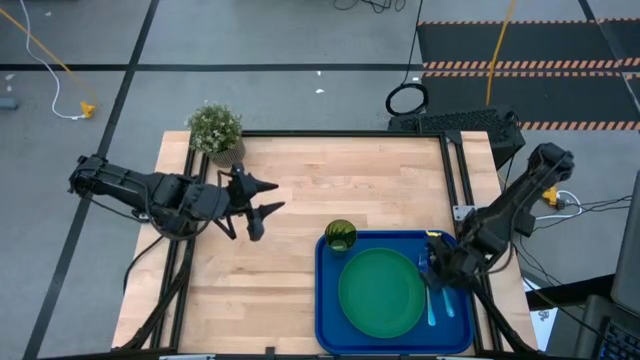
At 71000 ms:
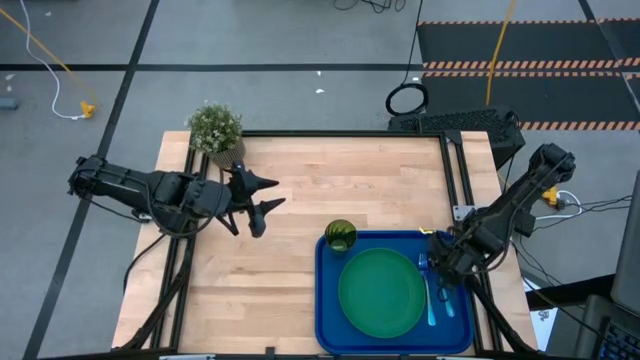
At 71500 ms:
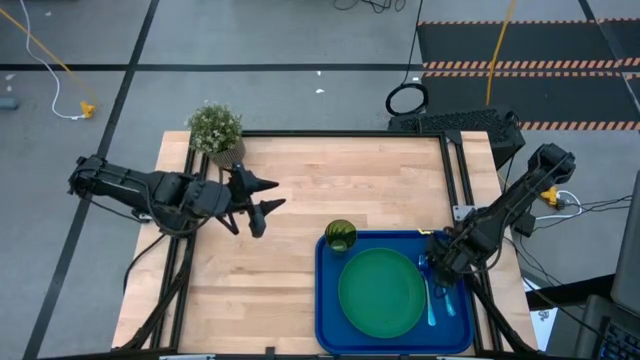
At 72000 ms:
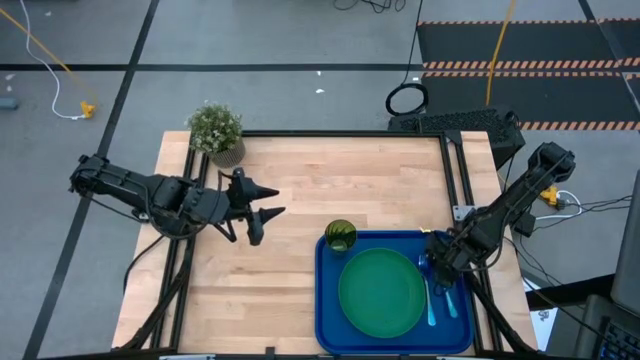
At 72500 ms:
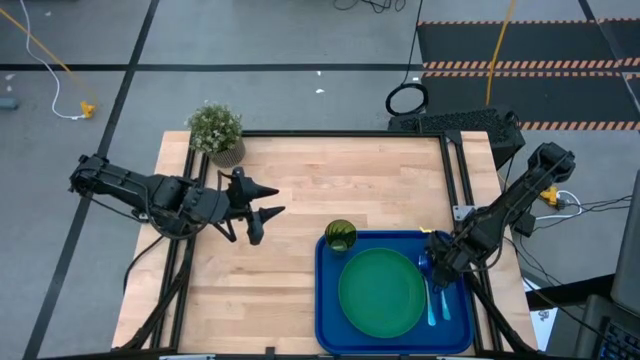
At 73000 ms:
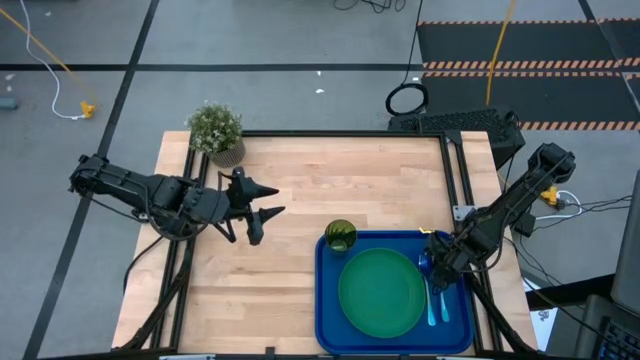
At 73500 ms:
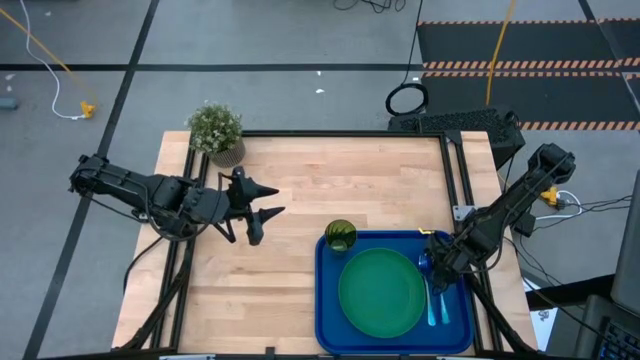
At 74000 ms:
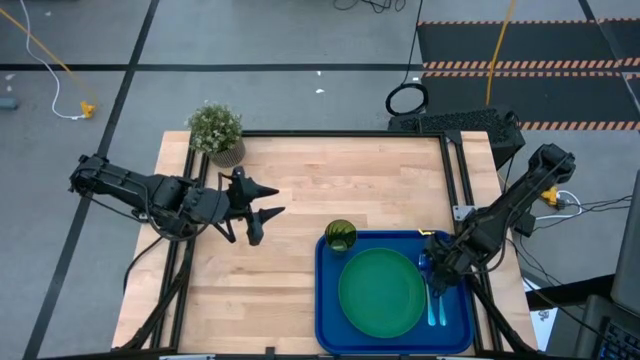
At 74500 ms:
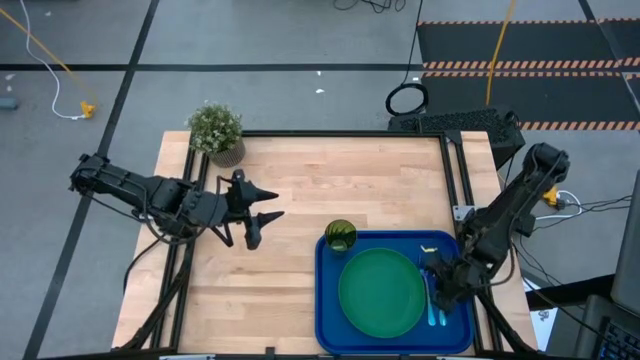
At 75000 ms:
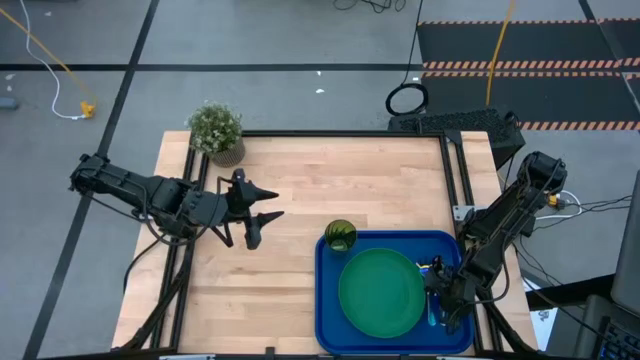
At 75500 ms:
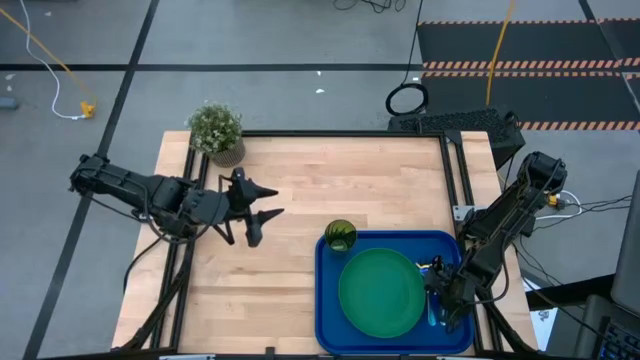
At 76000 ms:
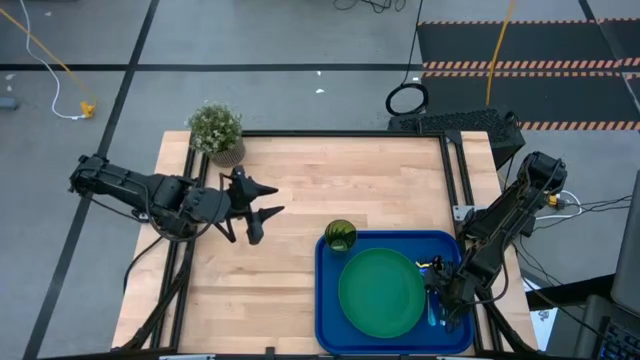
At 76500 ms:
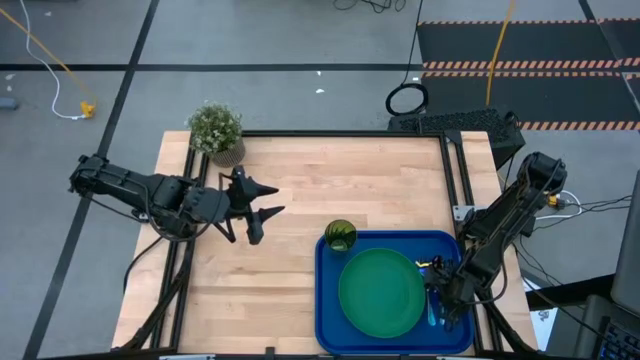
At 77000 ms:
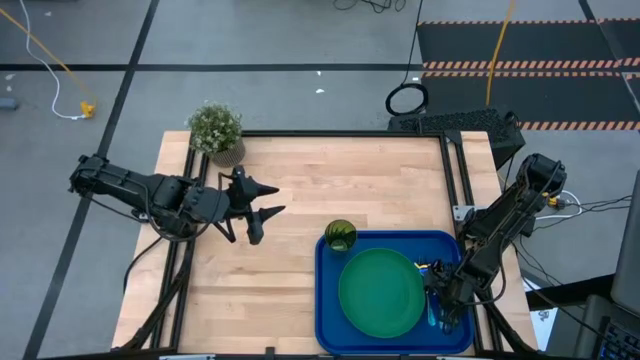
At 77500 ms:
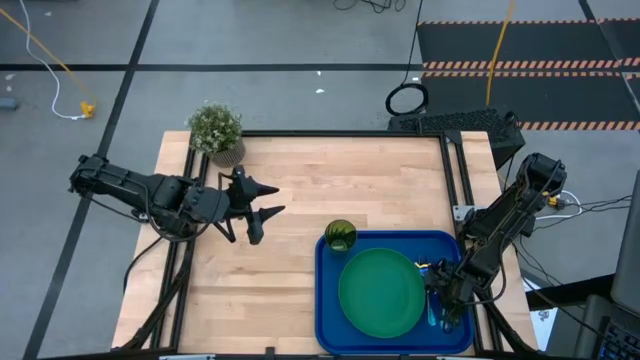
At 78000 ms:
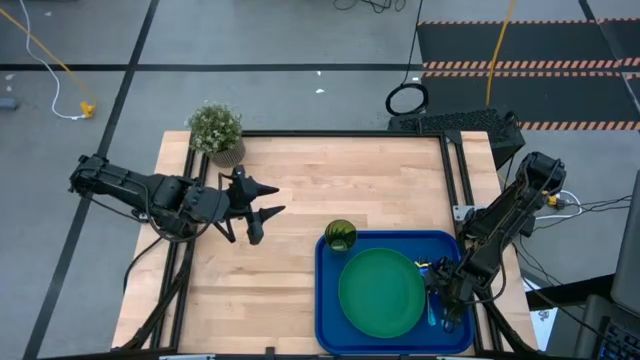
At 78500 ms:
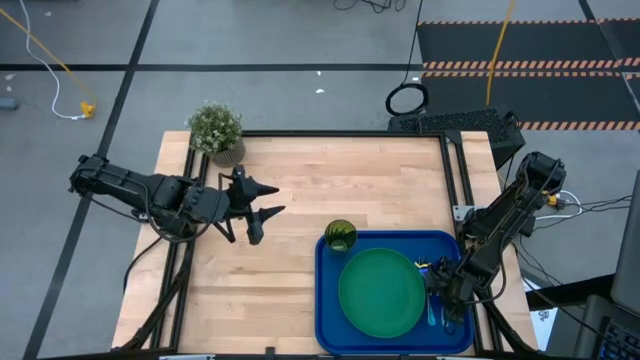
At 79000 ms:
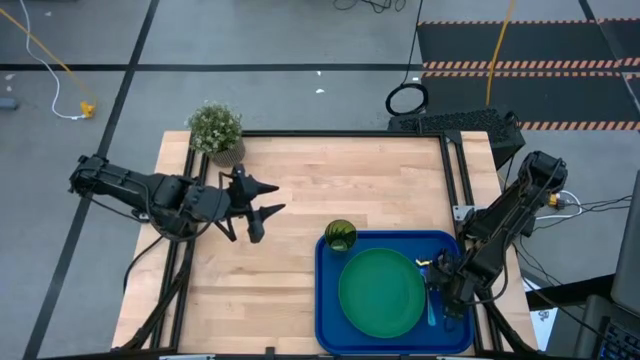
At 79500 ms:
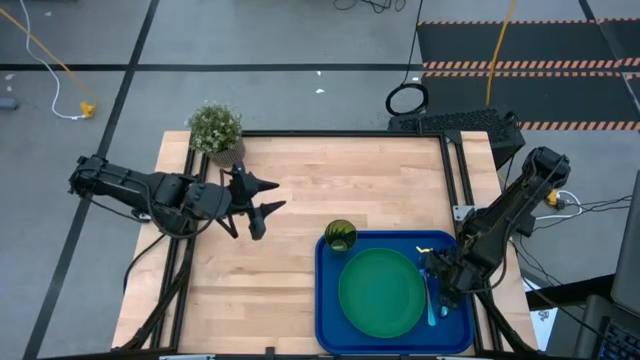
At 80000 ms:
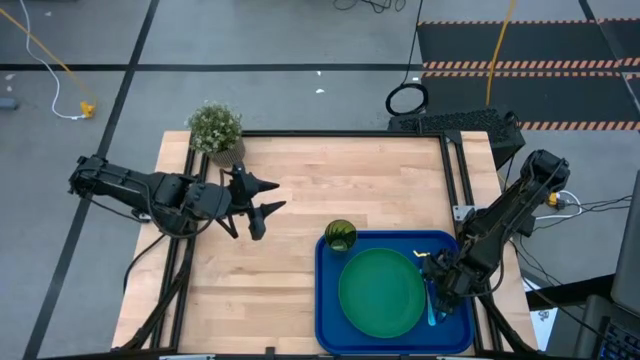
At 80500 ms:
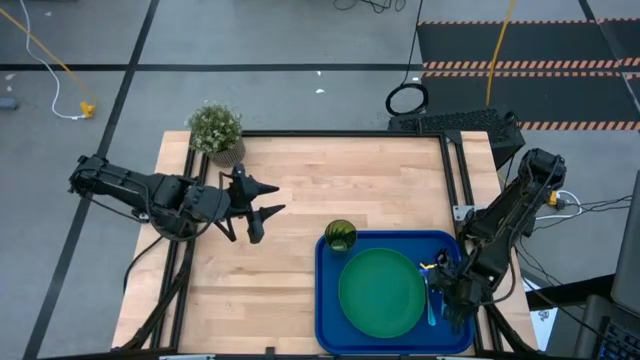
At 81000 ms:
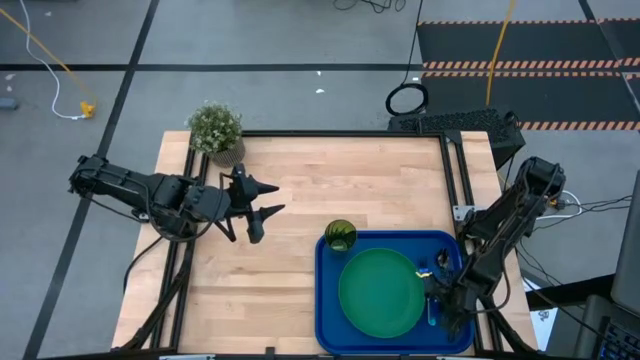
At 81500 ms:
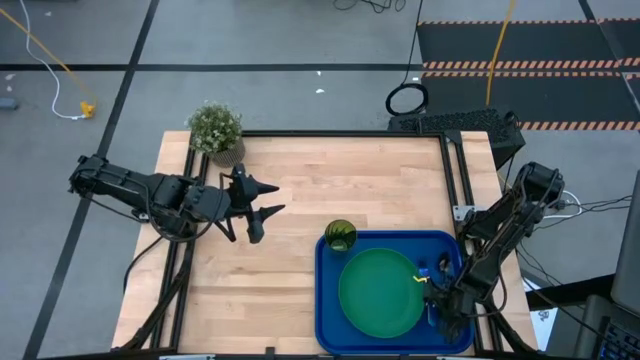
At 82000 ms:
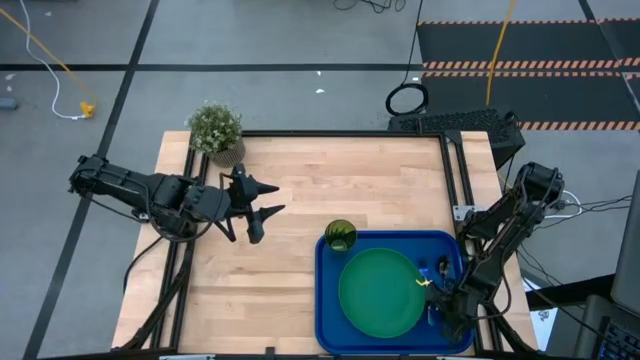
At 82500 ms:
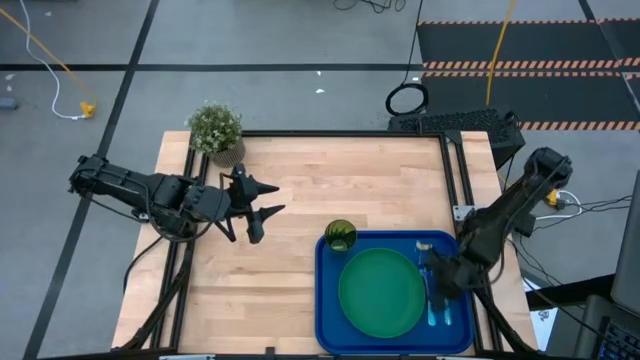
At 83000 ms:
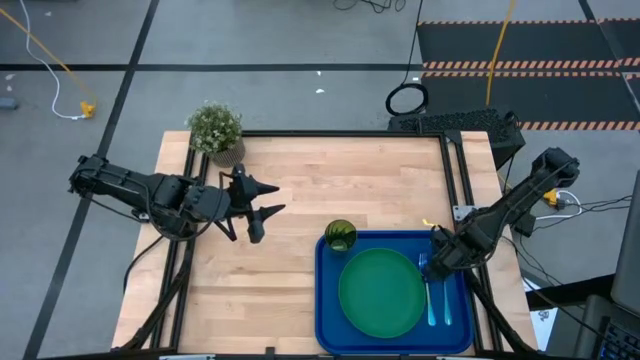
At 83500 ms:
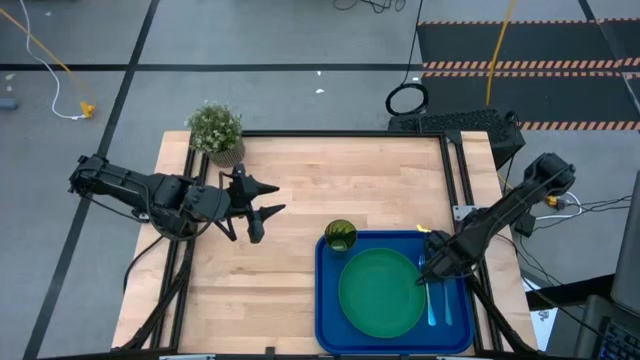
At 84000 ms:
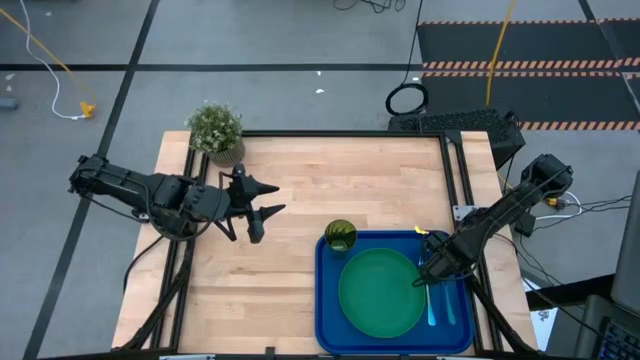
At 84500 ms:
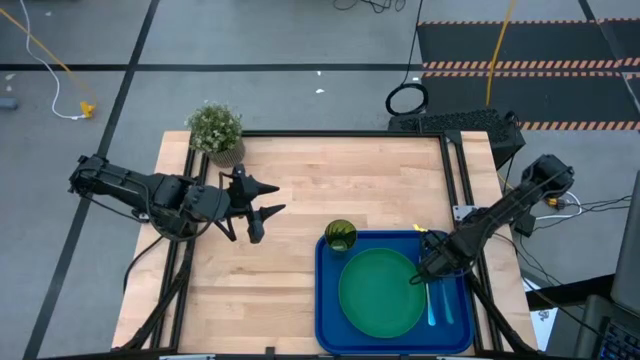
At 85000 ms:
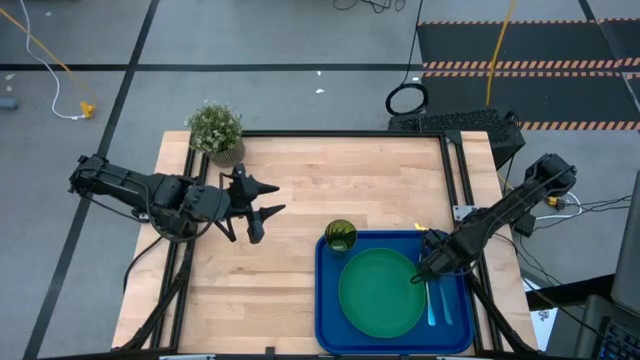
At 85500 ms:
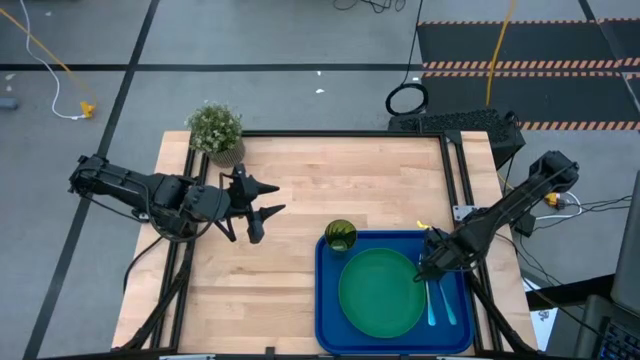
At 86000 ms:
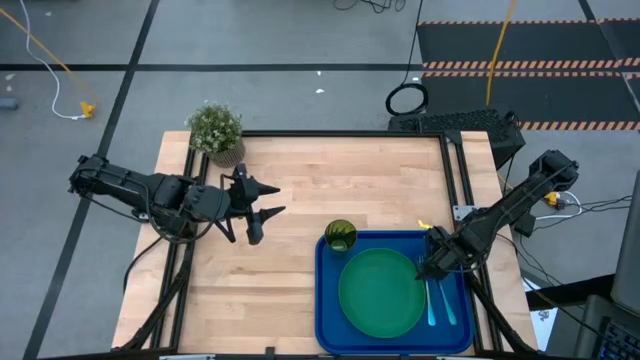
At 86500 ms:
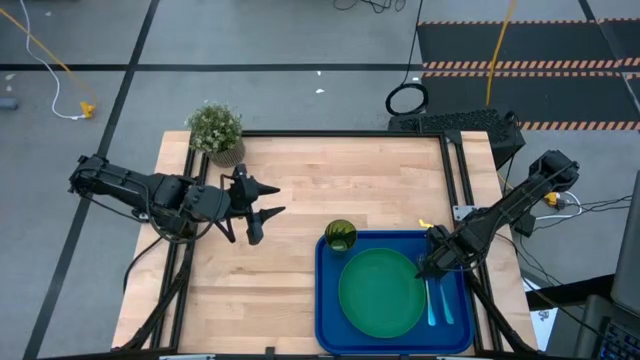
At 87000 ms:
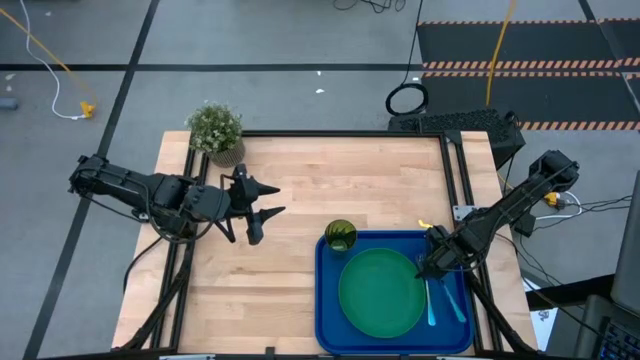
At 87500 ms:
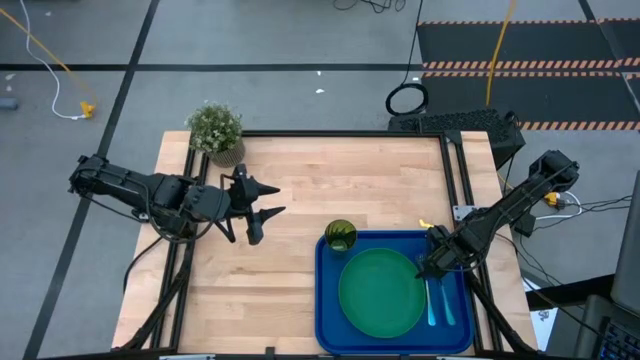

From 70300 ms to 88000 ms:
Task: Pick and place plate/cup/fork/spoon on tray
Put the blue spoon on the blue tray to the right of the blue fork

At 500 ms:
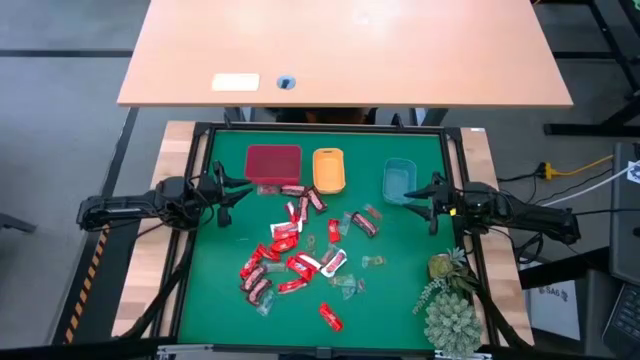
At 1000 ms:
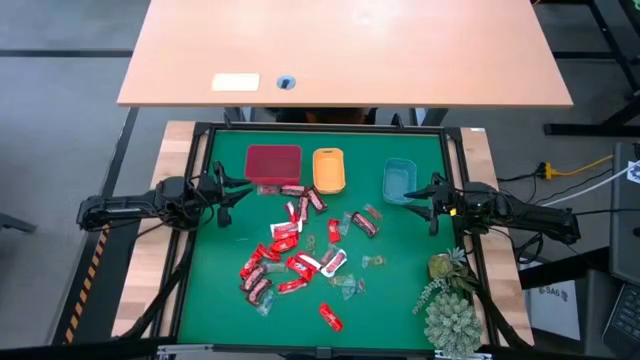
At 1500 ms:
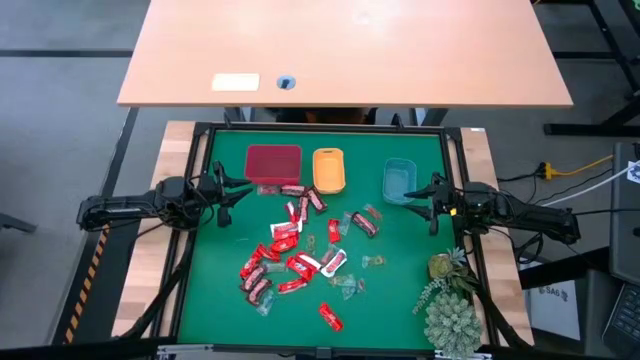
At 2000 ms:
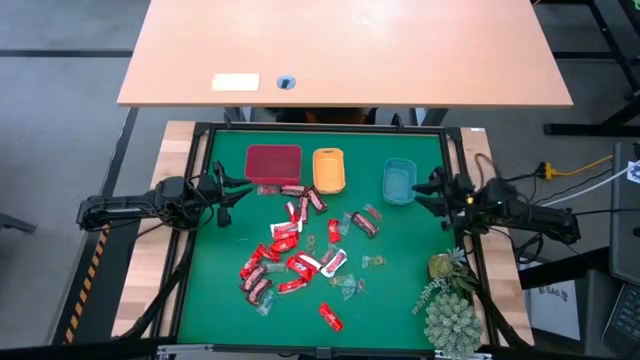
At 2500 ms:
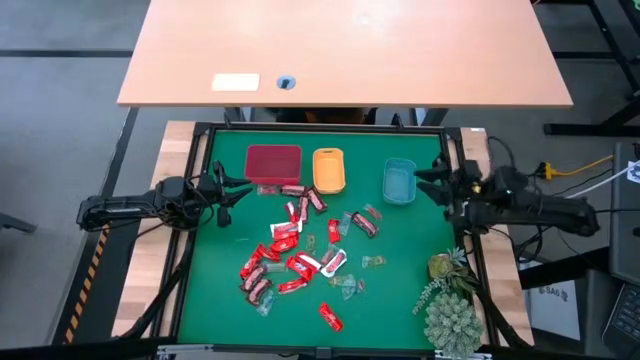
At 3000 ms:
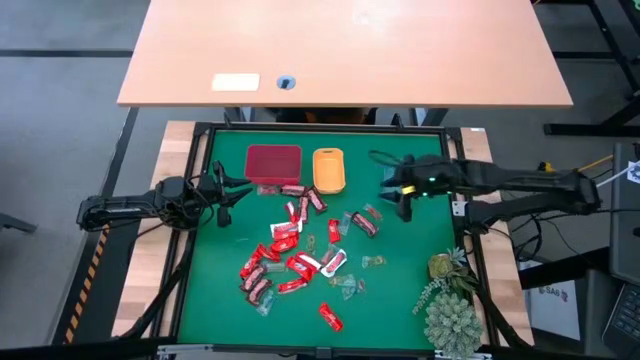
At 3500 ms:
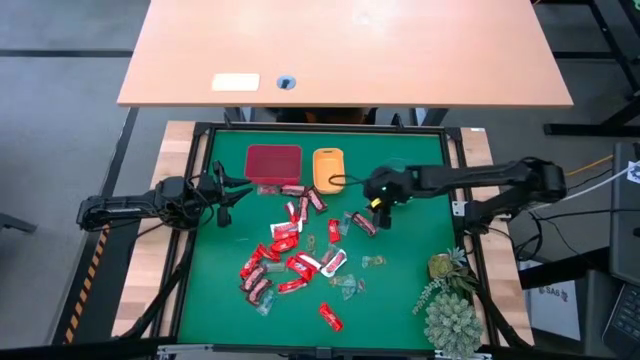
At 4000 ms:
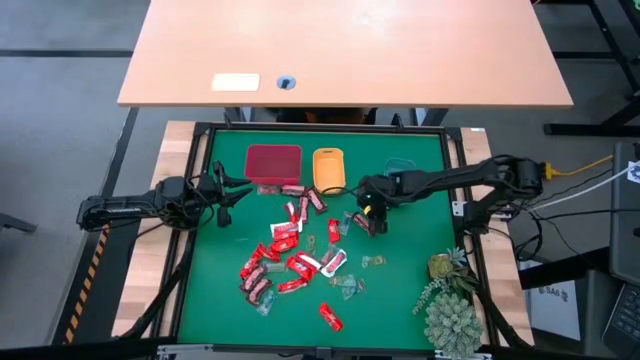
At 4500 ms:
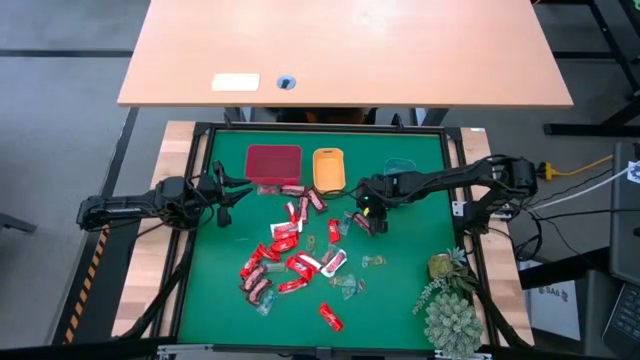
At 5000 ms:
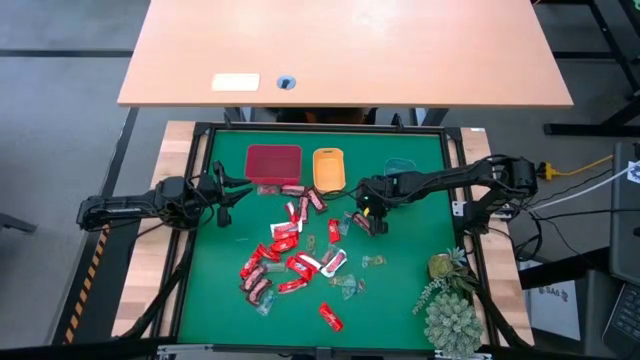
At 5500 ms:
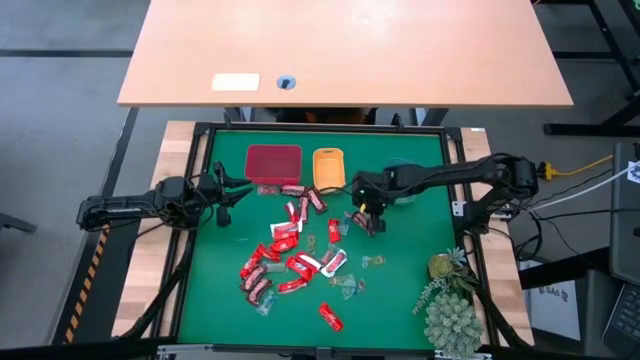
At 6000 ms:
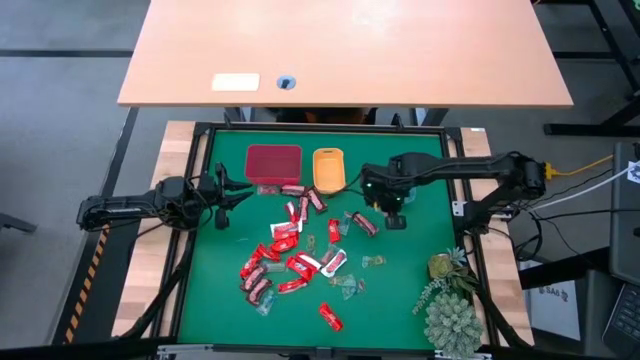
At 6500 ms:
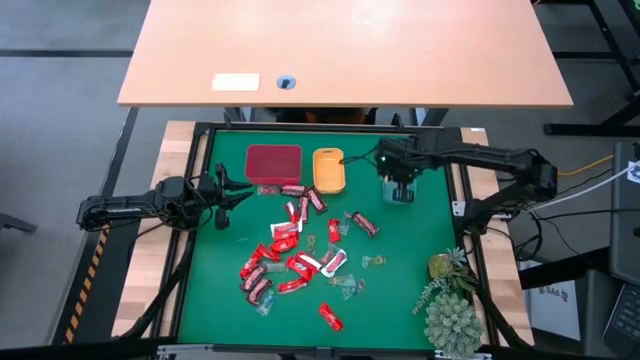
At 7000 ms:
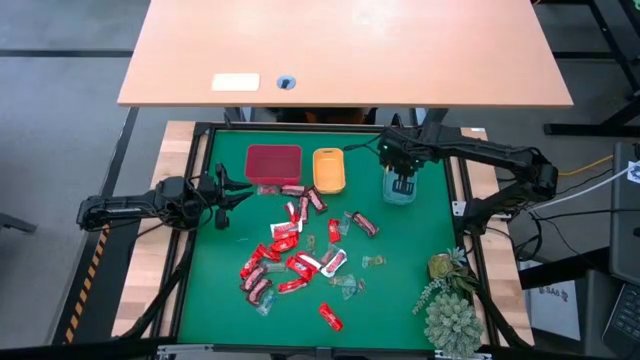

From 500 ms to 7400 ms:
Task: Sort candy
Put the orange gummy into the blue bin
